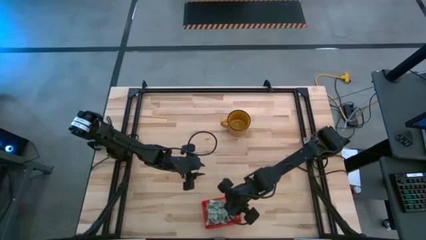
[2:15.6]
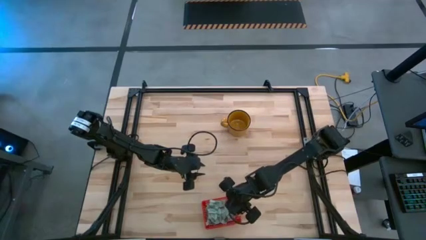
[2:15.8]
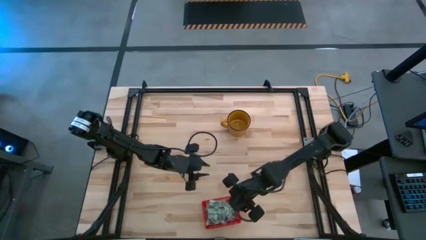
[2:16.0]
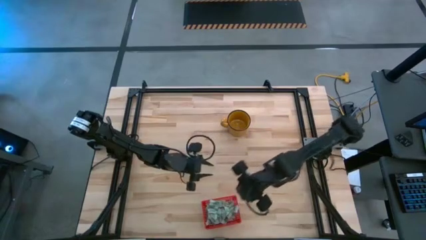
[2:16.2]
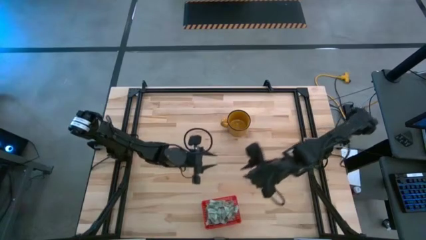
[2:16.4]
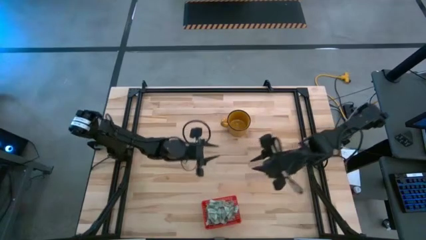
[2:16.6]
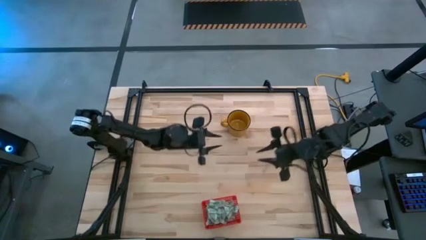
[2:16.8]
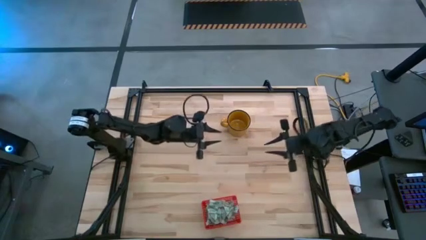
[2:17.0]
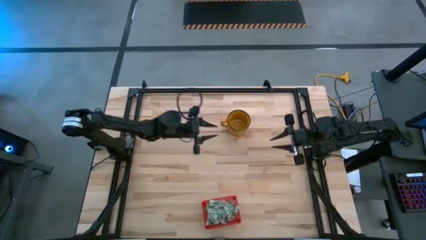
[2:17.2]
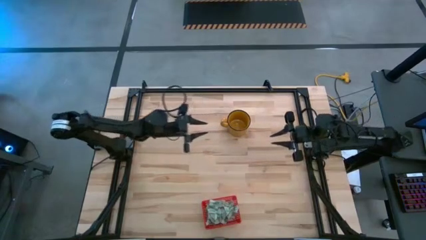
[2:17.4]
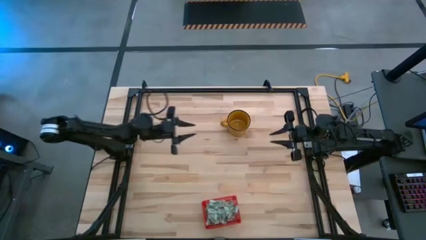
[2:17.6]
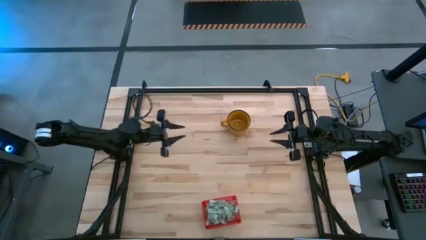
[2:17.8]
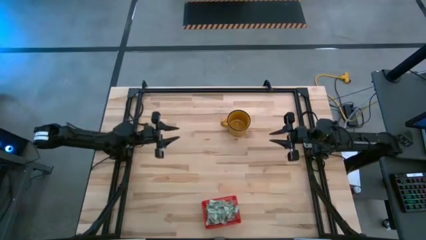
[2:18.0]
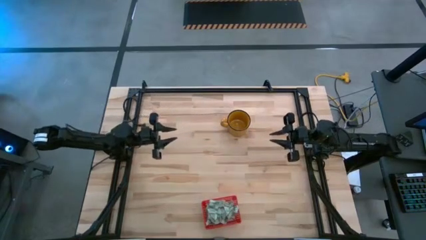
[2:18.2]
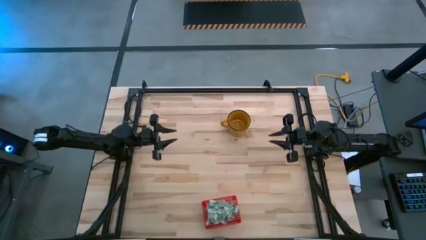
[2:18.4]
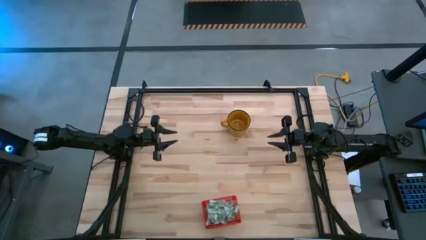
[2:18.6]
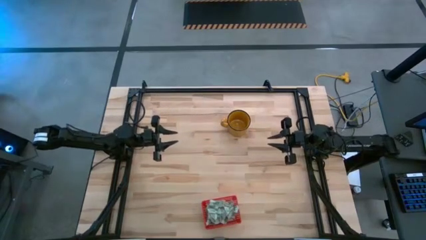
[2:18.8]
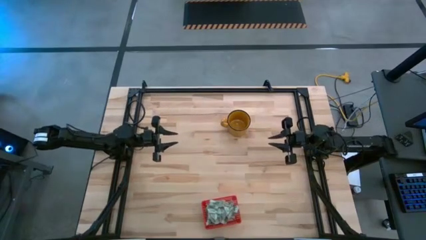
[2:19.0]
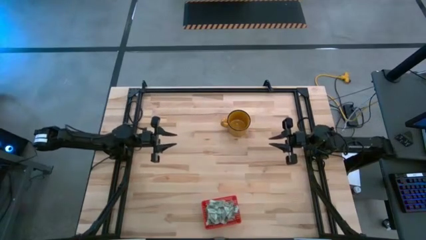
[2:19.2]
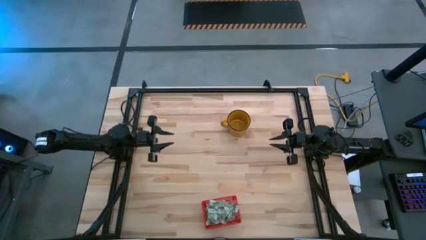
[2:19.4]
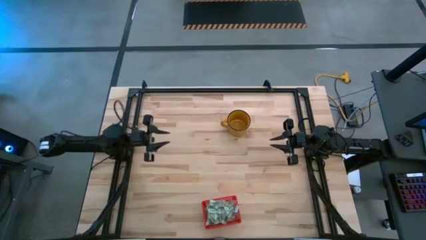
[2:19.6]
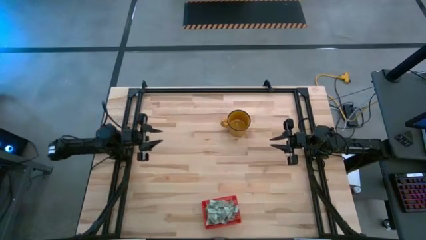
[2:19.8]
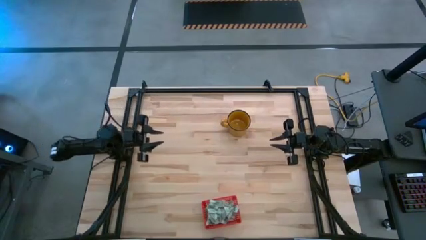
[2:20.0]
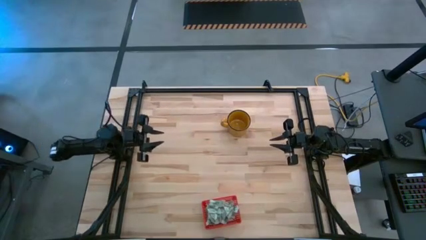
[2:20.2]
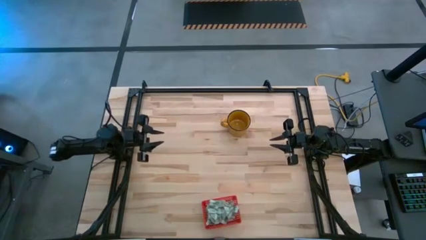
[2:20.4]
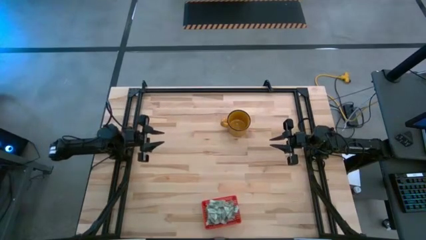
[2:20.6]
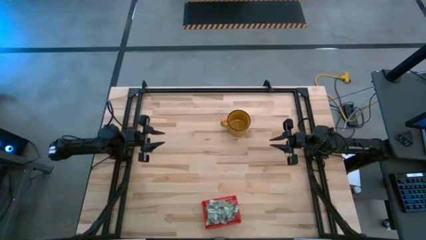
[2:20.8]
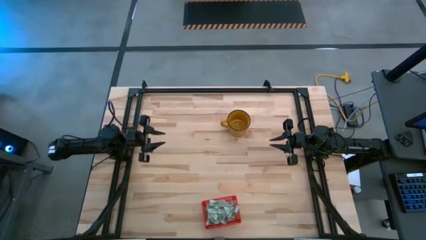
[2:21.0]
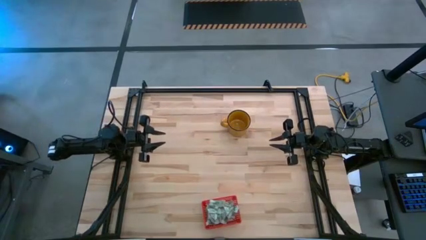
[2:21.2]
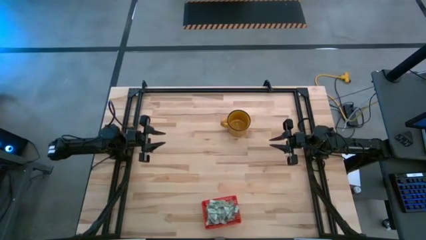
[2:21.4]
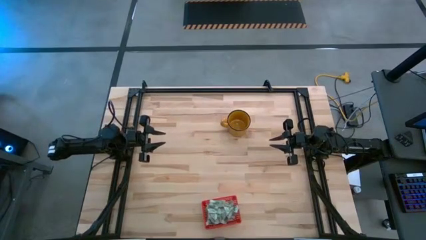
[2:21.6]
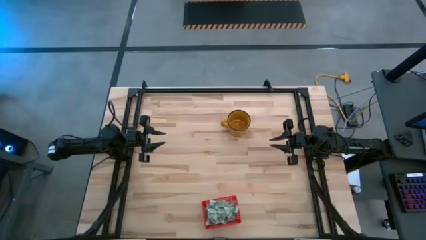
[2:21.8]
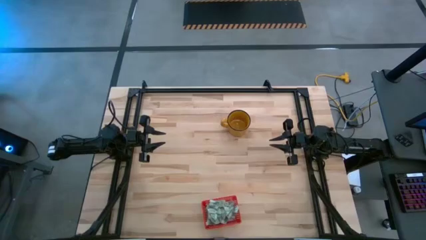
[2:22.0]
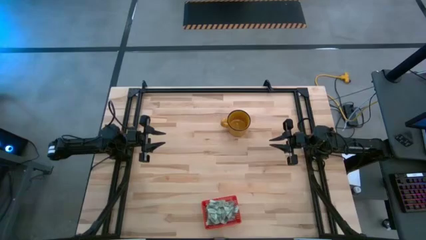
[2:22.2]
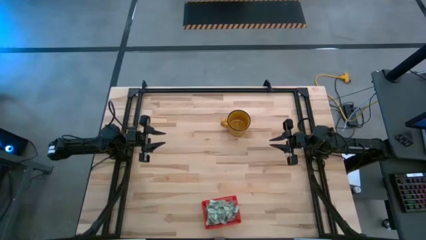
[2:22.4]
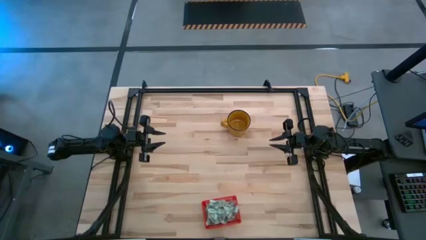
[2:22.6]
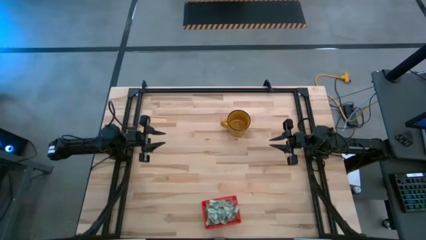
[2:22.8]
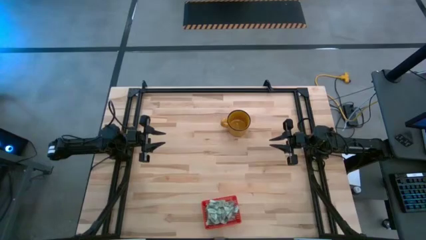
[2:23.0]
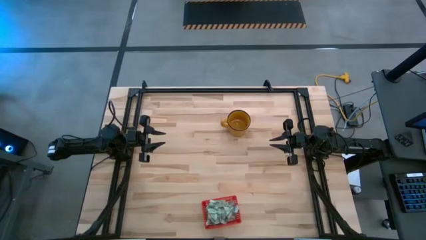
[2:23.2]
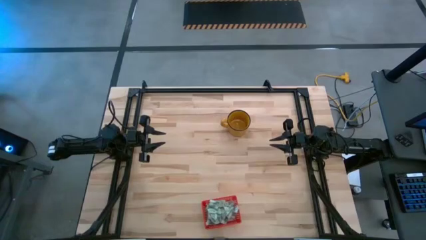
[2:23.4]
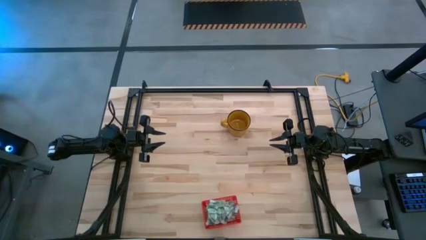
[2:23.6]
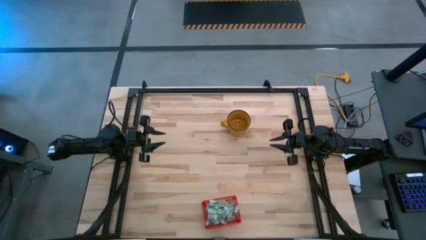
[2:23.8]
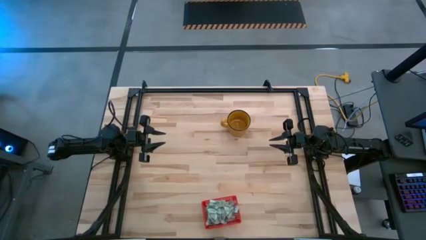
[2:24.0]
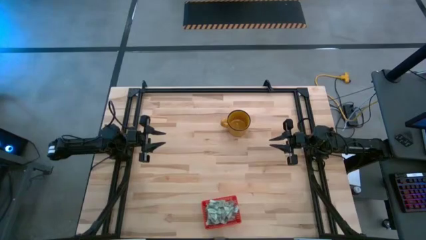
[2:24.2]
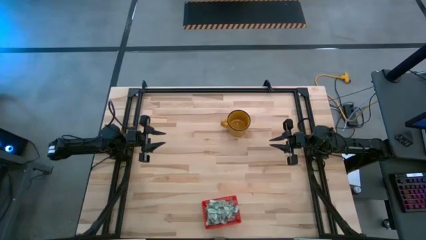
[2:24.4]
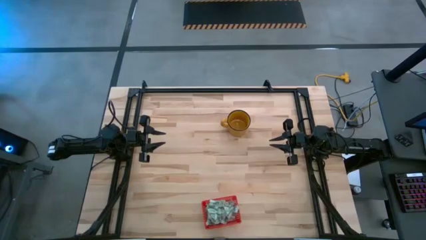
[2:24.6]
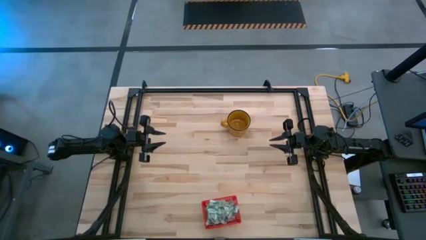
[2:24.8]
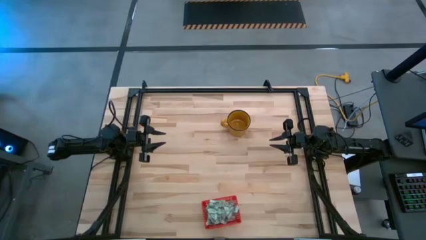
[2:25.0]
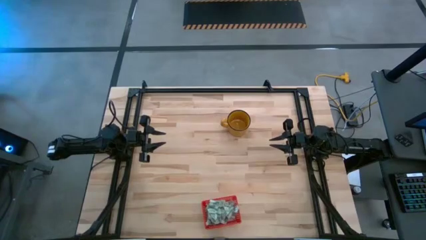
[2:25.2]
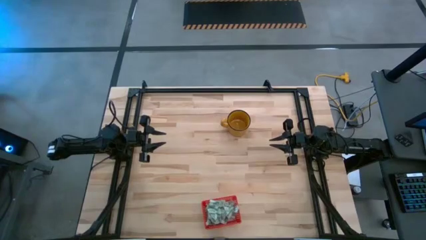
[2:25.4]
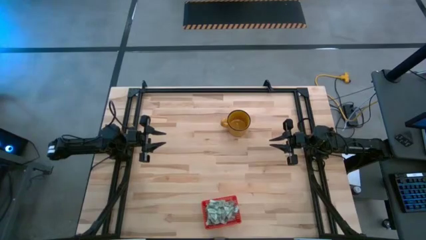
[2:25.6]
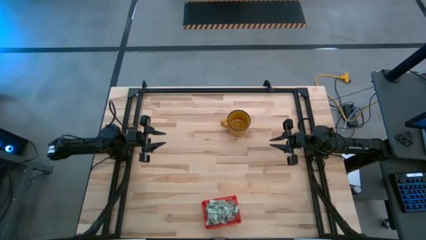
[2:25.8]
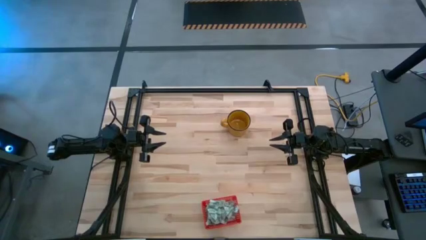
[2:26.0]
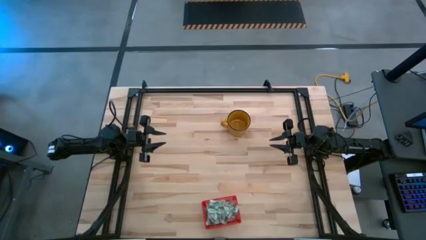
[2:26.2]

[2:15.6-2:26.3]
Task: Pick and place Stevia / Truvia into bins
Return to Home Position

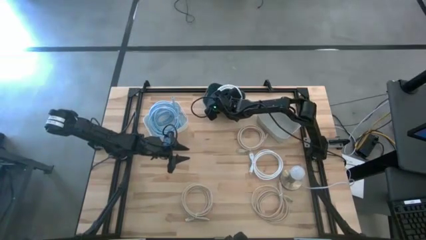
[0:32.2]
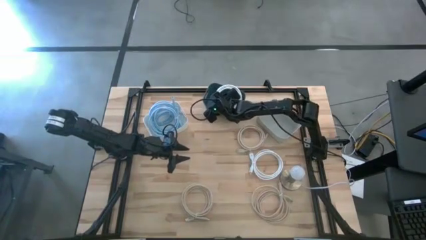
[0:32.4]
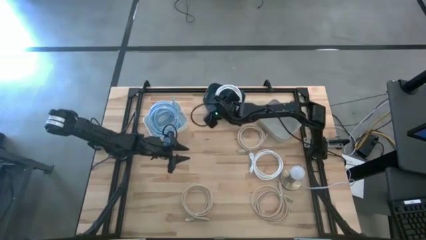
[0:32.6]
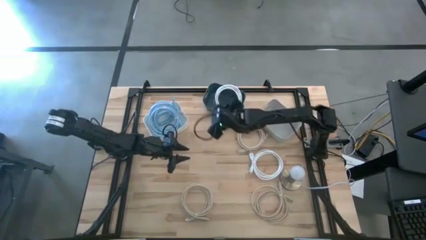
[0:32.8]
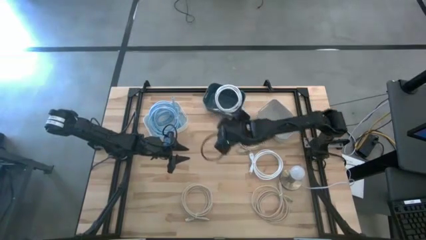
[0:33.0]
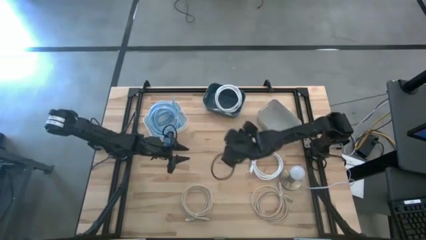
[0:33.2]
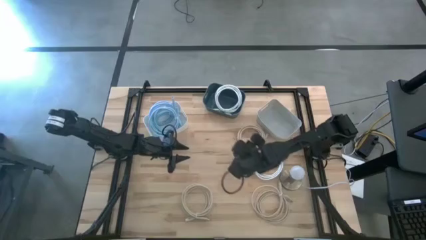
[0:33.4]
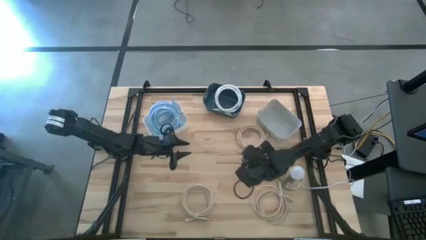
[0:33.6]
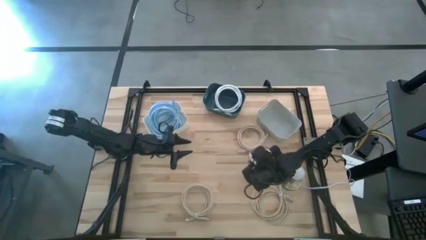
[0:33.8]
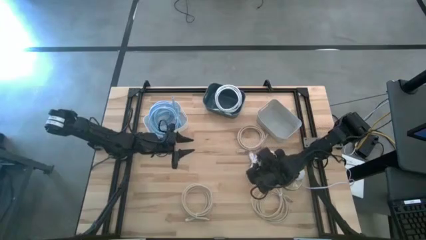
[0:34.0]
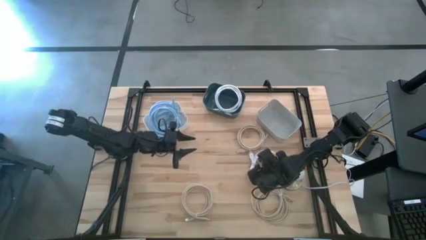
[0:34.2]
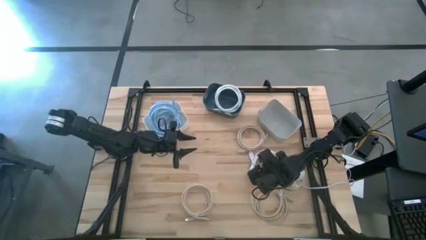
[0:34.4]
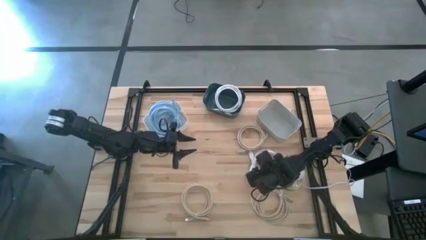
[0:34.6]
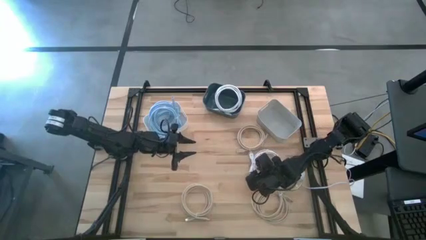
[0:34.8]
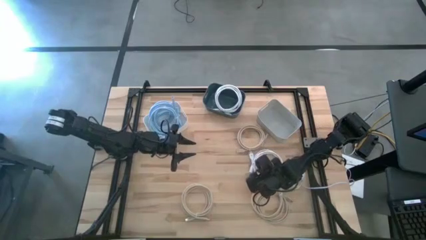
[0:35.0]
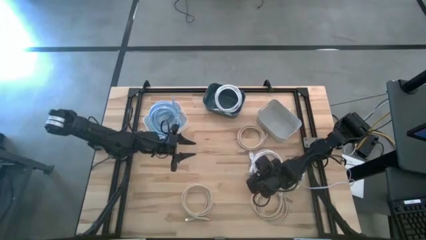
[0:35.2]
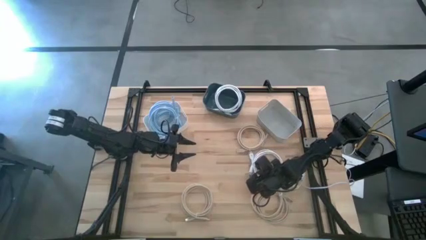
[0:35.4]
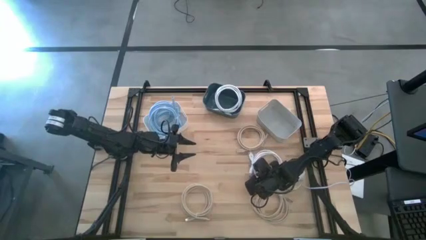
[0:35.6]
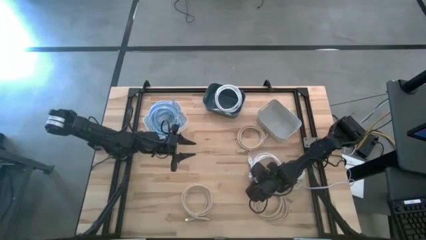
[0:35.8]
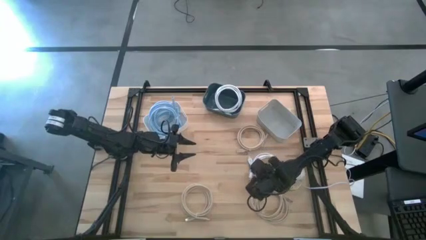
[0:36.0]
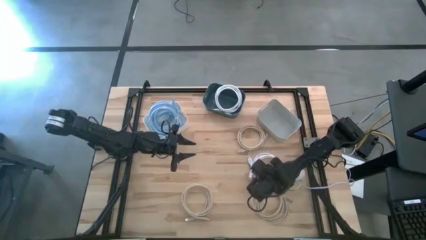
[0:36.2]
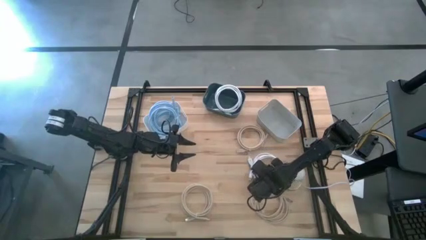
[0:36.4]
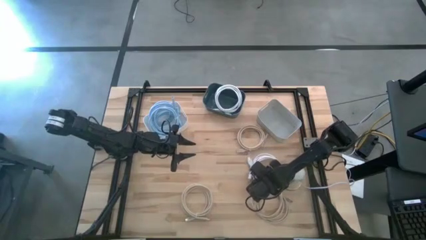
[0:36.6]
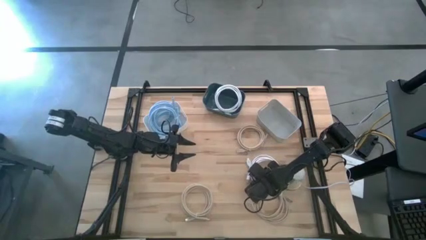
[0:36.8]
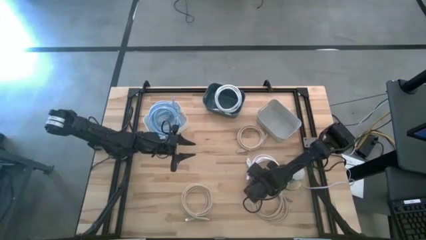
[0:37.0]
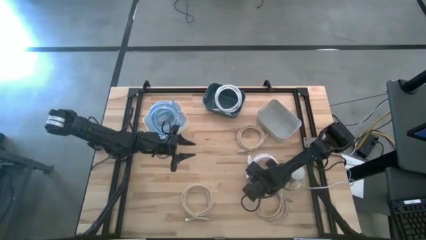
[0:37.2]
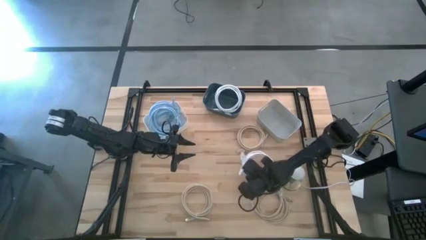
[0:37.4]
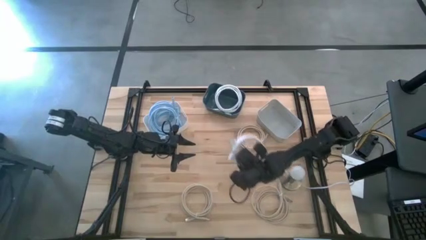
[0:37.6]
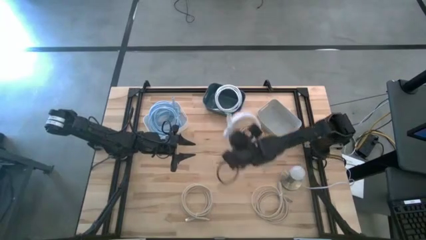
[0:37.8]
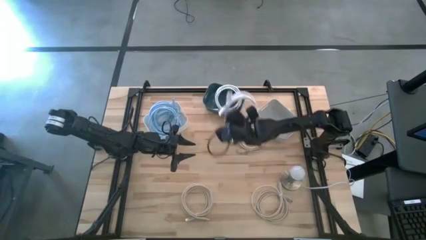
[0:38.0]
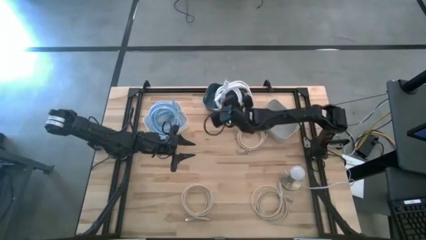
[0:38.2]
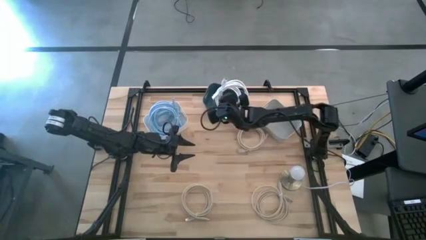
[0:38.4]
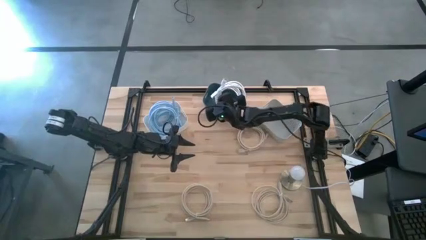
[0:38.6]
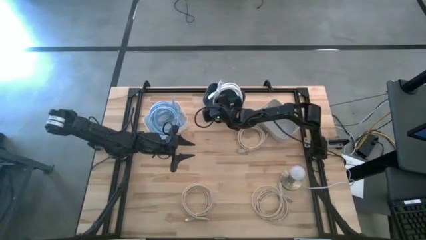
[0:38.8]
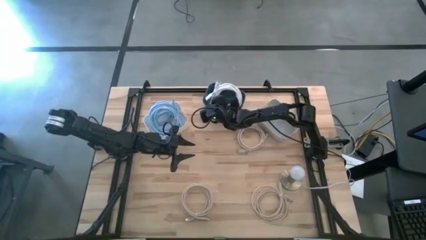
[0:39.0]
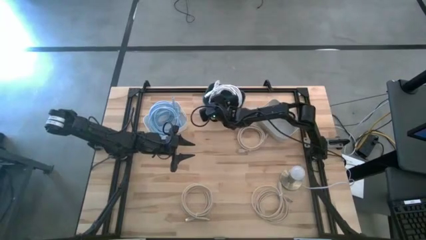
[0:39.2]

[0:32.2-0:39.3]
Task: Pick & Place USB Port
Put the white usb cable into the green bin
